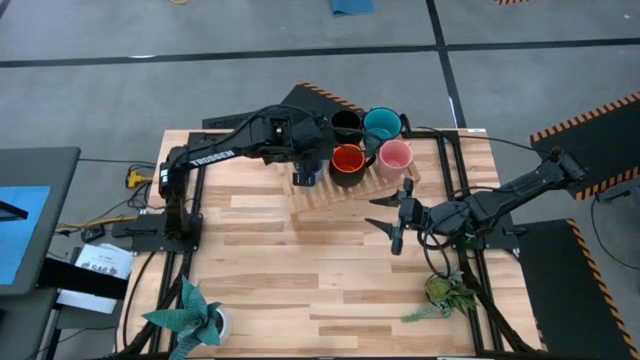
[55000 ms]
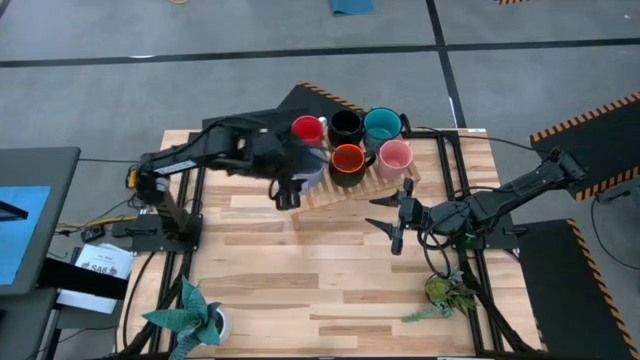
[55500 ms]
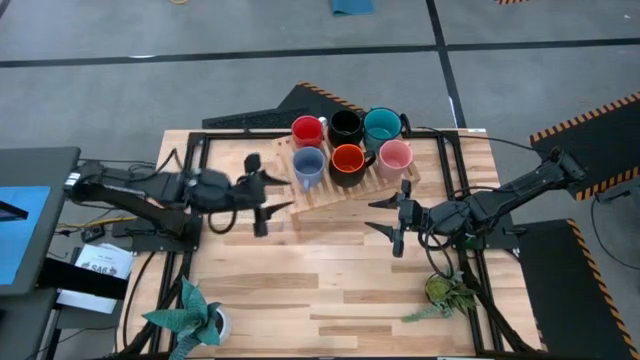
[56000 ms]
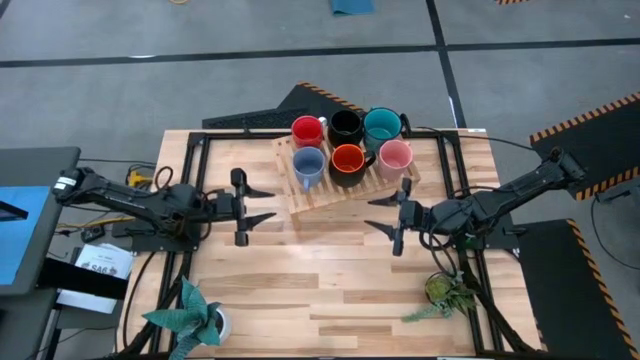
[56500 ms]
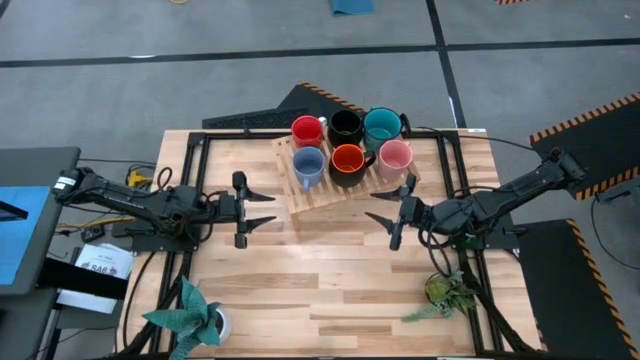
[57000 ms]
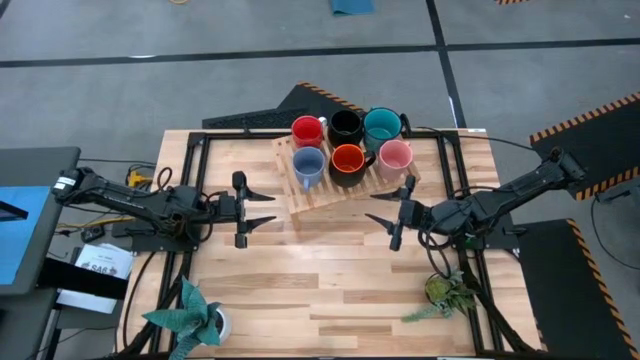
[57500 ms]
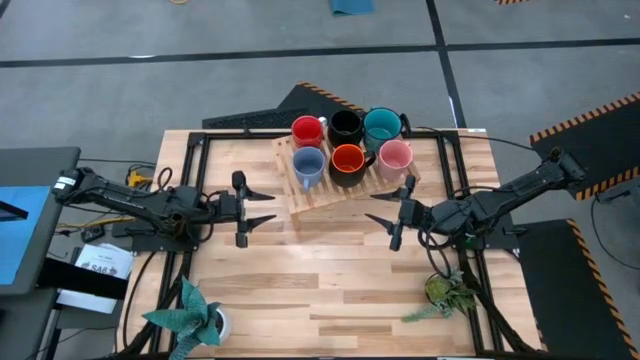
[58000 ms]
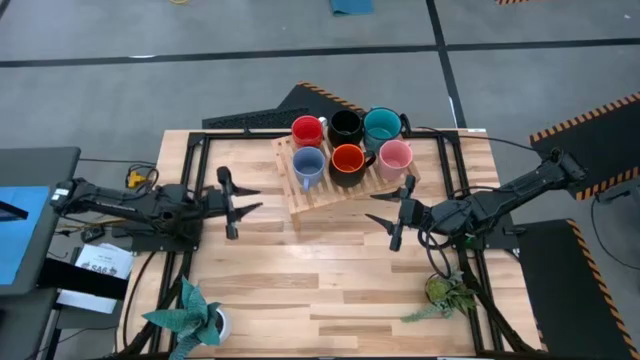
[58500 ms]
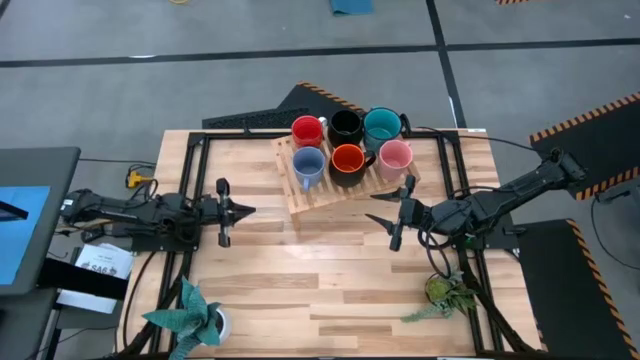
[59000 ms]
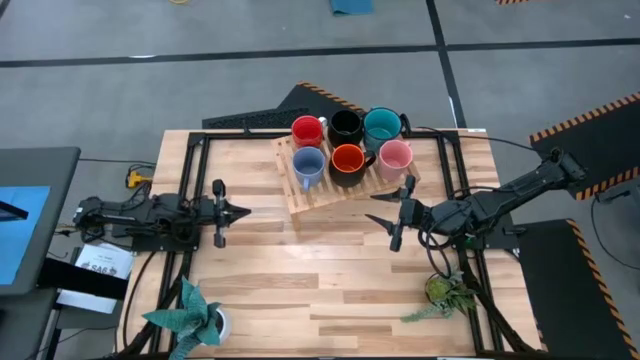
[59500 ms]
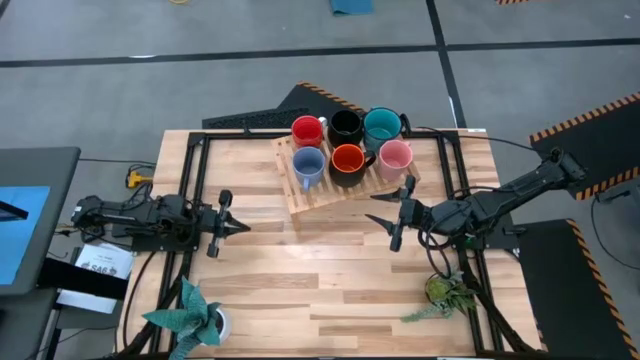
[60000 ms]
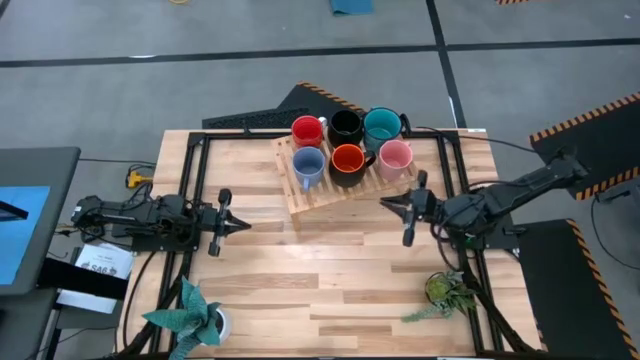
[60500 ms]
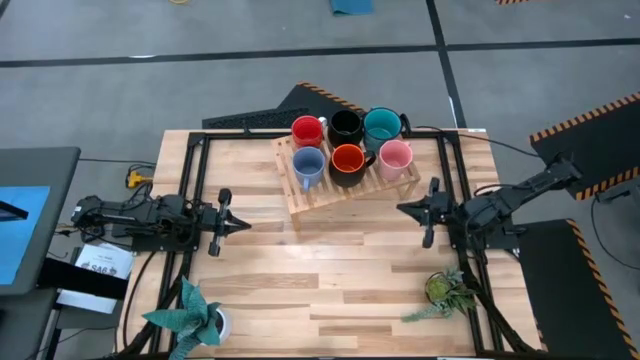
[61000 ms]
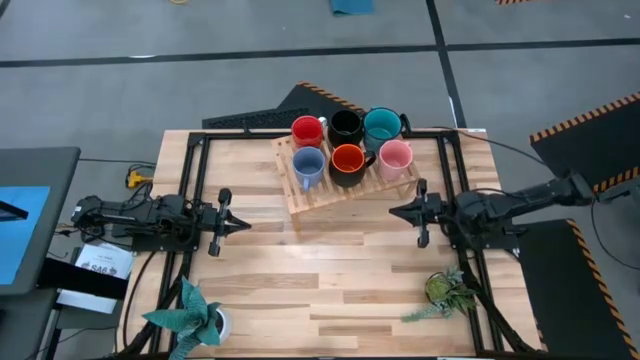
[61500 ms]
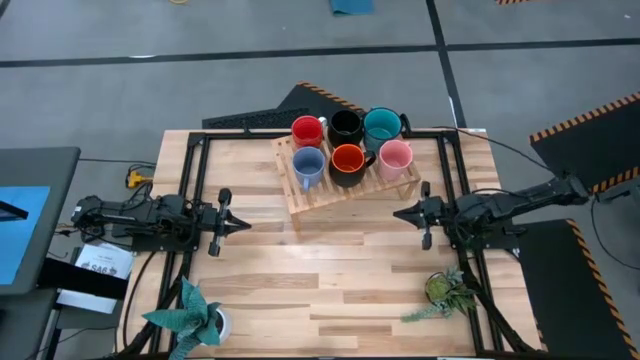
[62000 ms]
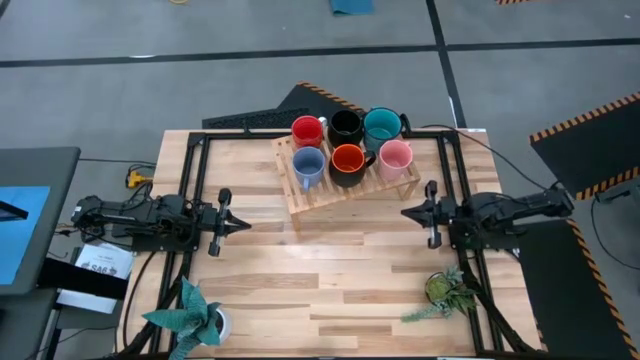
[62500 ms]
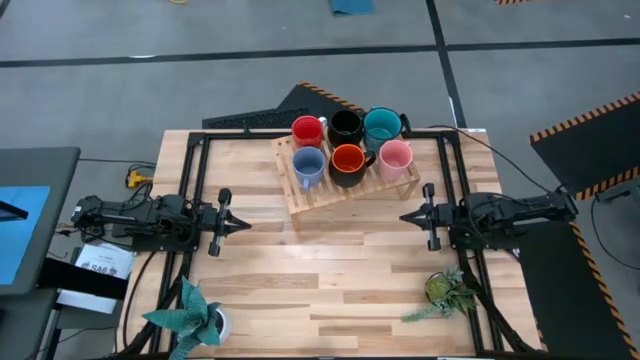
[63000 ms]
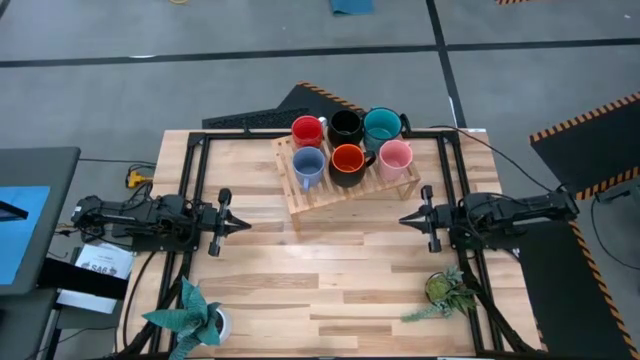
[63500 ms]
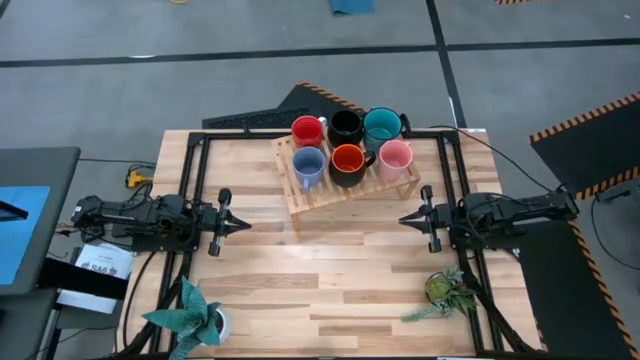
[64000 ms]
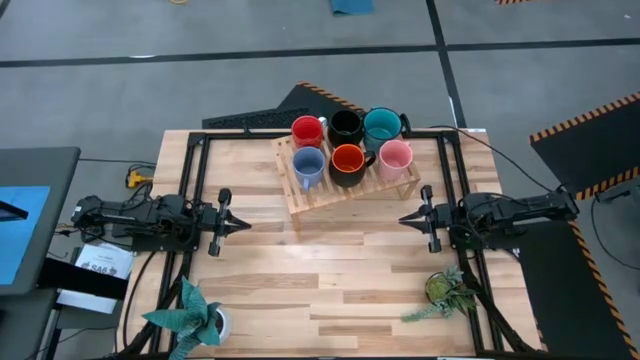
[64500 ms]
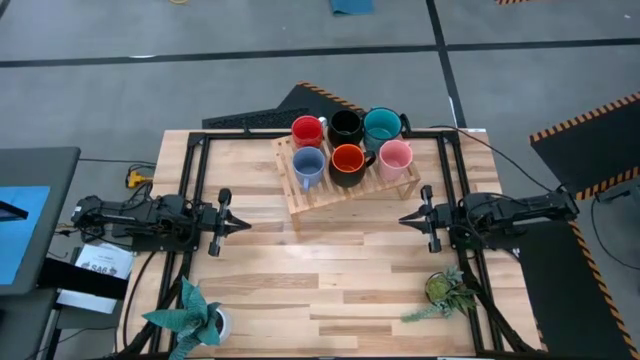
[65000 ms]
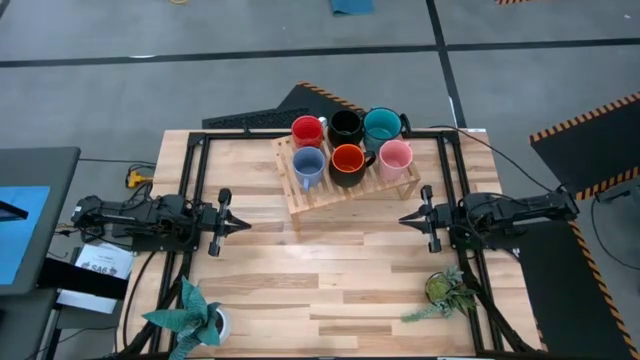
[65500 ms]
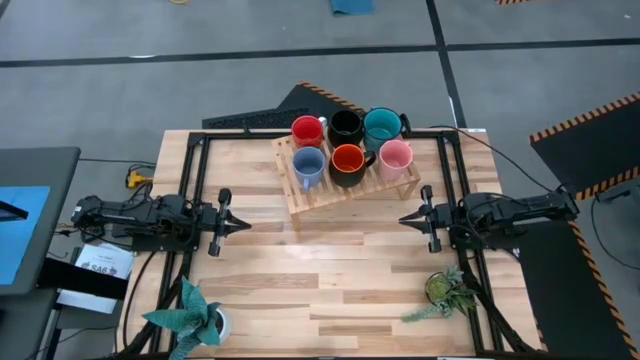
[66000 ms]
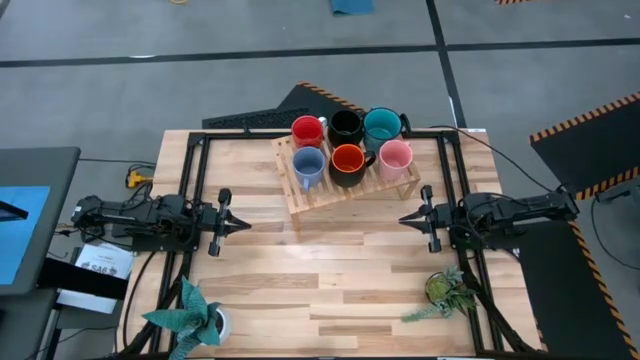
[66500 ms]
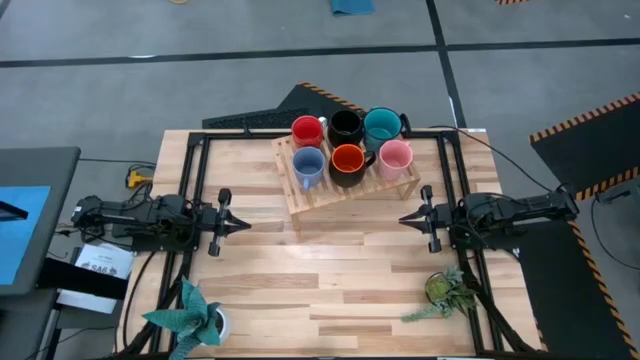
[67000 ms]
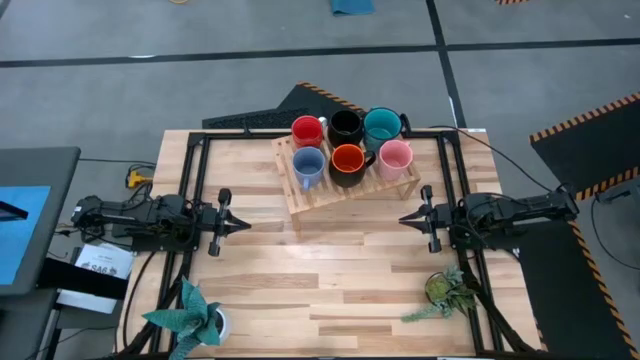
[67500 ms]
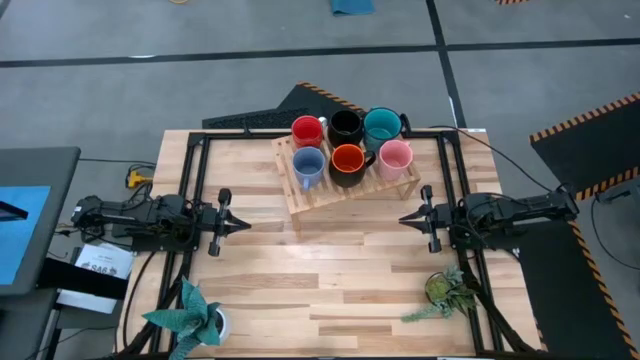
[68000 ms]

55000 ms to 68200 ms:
Task: Place coffee mugs
Return to Home Position

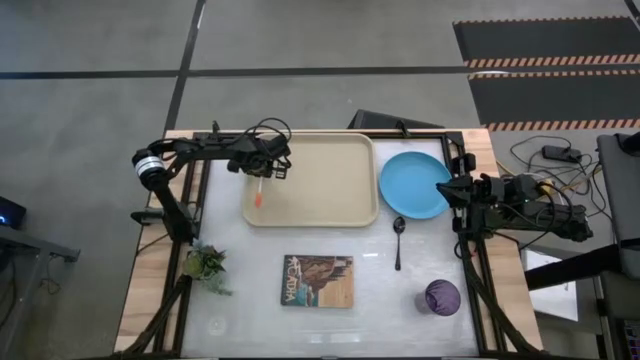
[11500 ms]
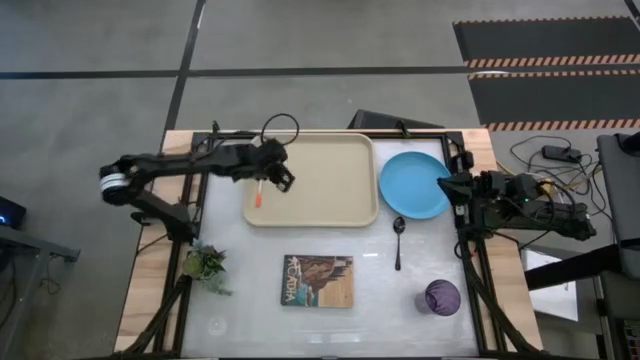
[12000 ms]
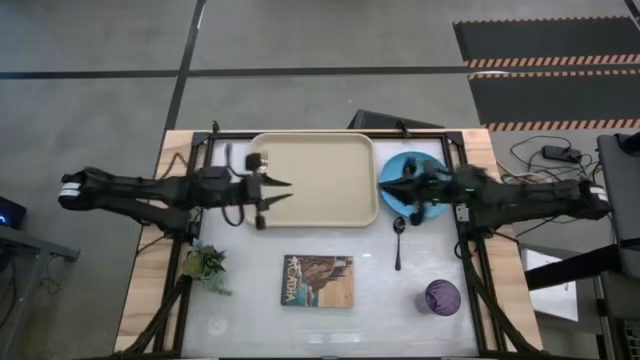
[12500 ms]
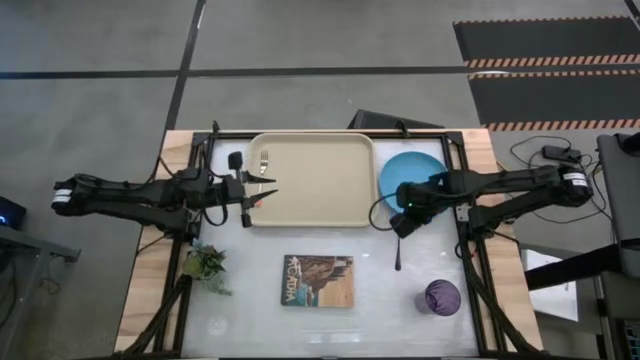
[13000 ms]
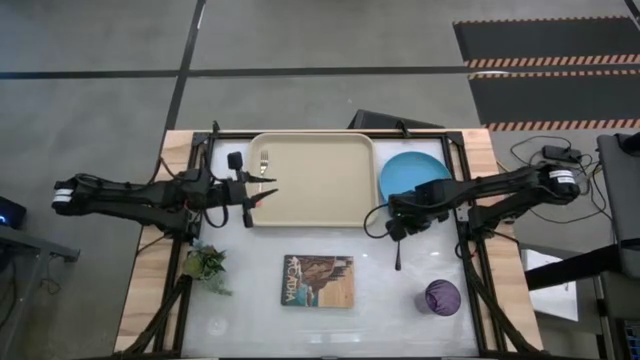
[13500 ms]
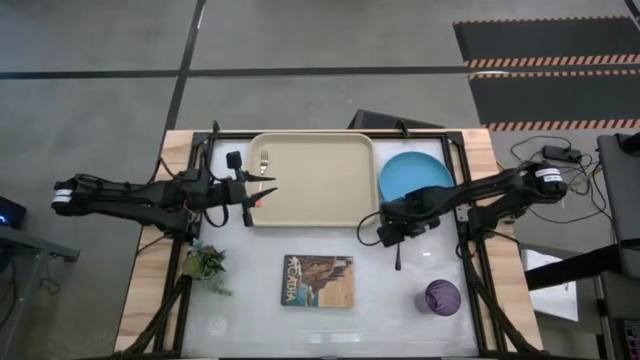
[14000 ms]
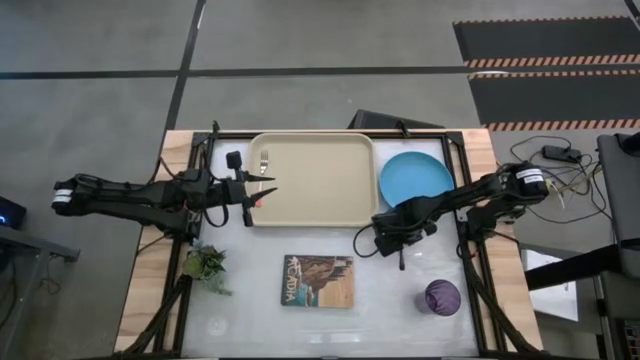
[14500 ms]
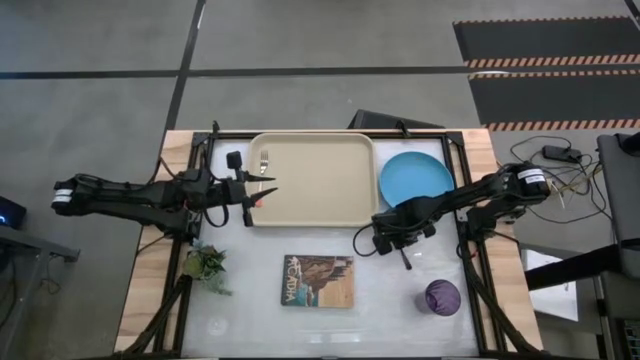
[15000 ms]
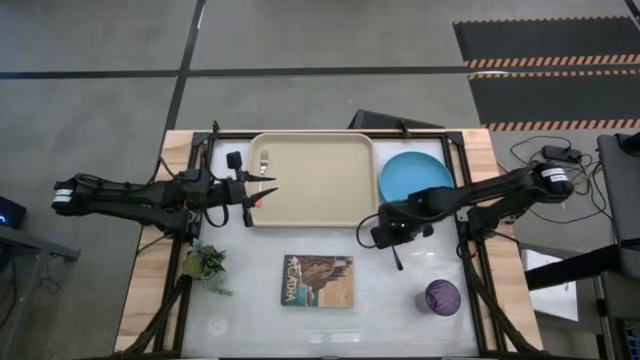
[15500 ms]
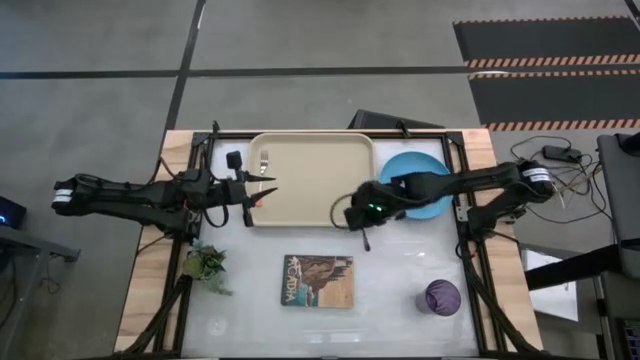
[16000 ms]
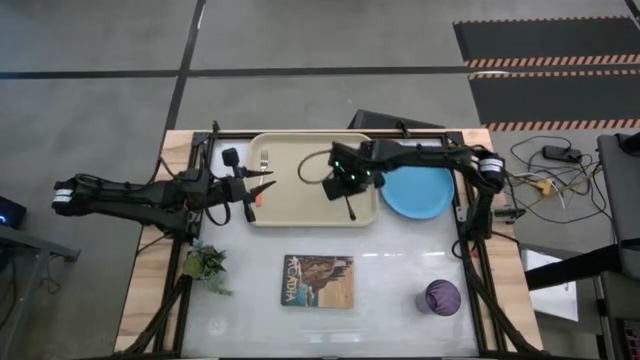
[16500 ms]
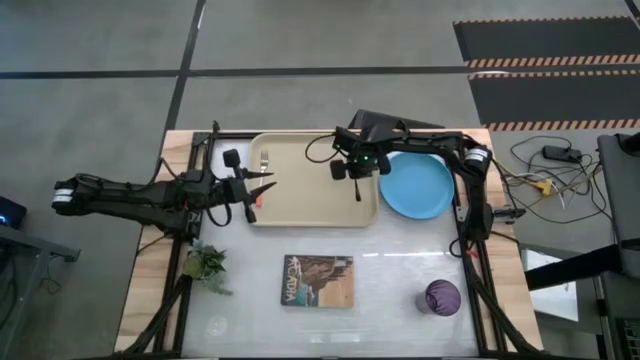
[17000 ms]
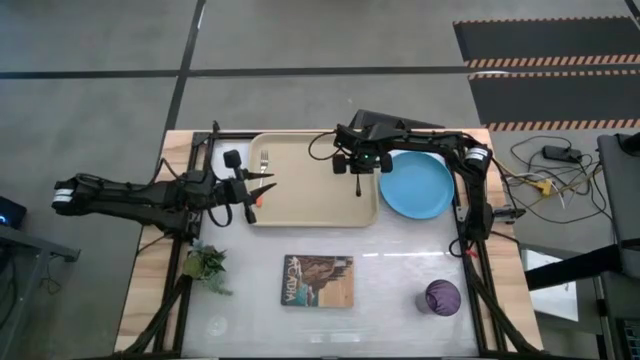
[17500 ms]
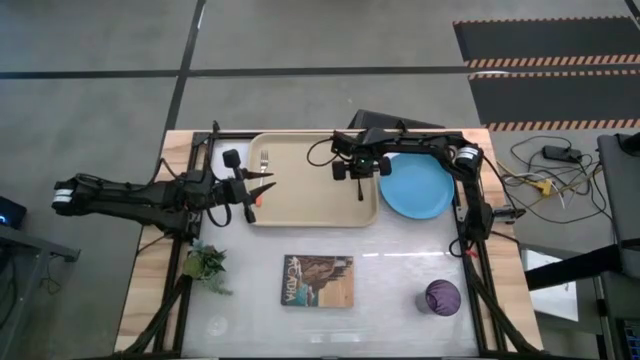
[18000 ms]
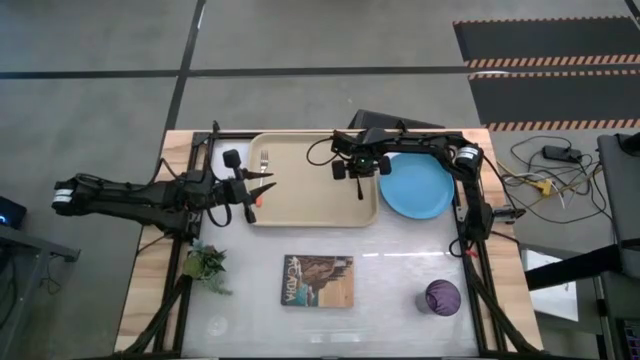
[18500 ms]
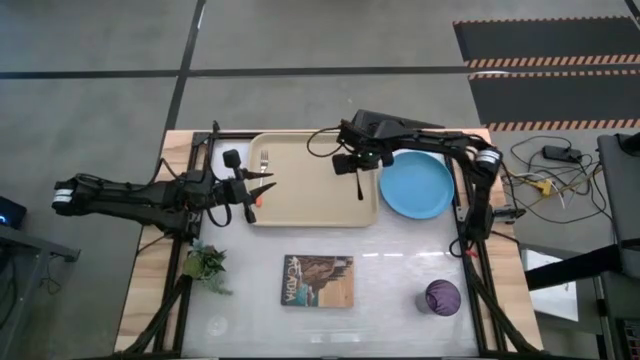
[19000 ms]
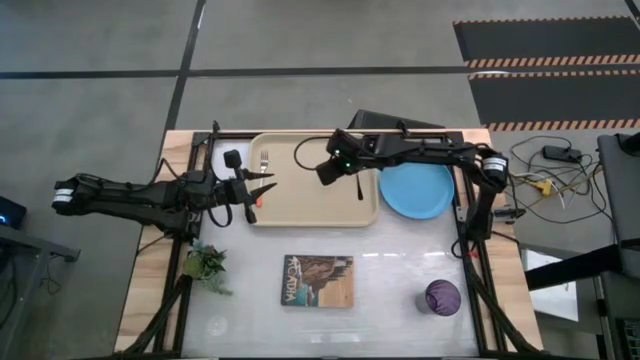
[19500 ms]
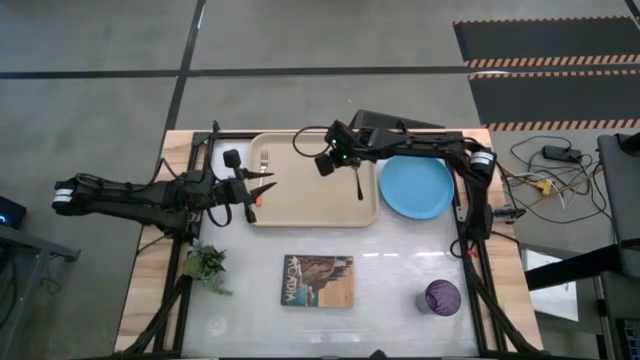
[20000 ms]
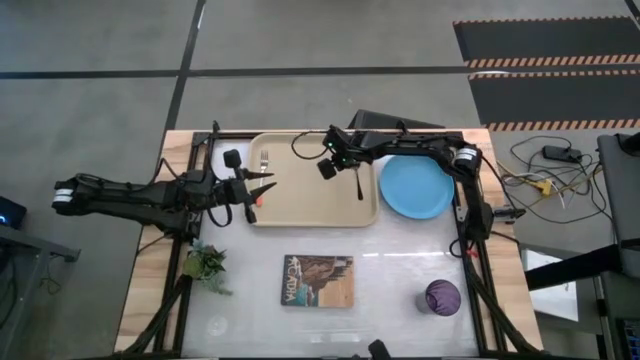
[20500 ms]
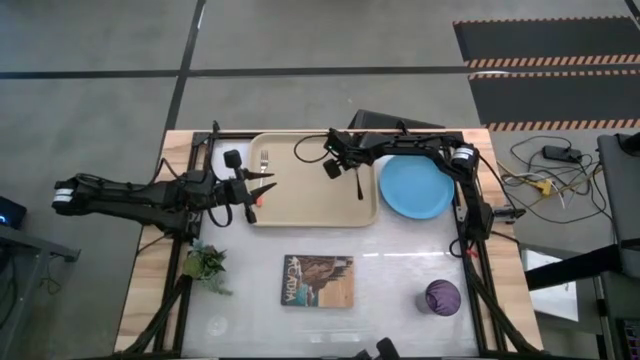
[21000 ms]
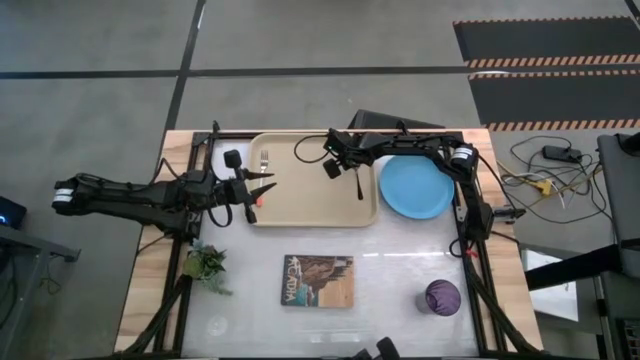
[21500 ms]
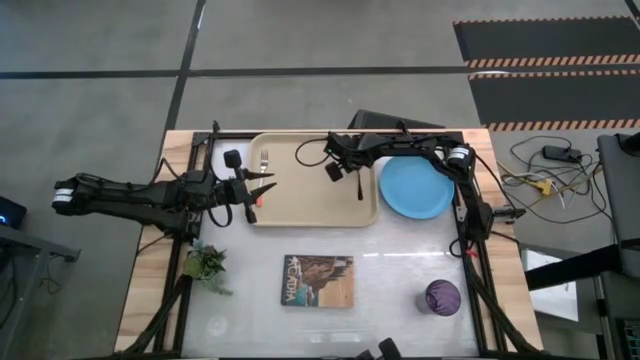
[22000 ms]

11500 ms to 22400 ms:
Task: Pick and place plate/cup/fork/spoon on tray
Put the black spoon on the light brown tray to the right of the orange fork
